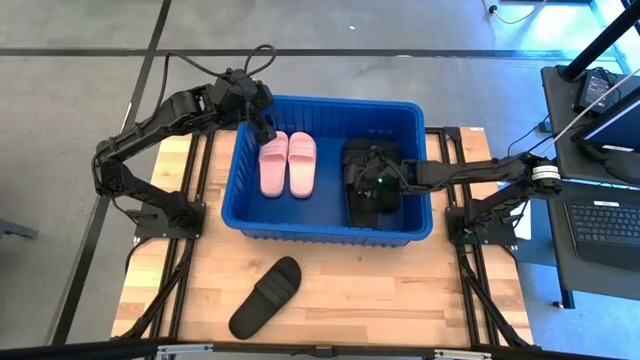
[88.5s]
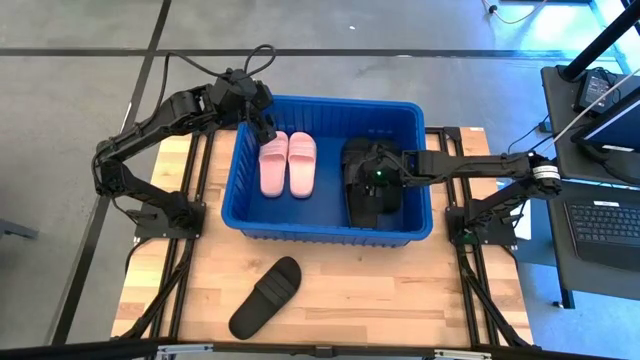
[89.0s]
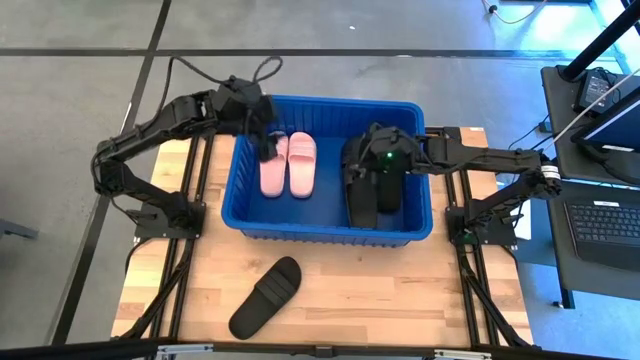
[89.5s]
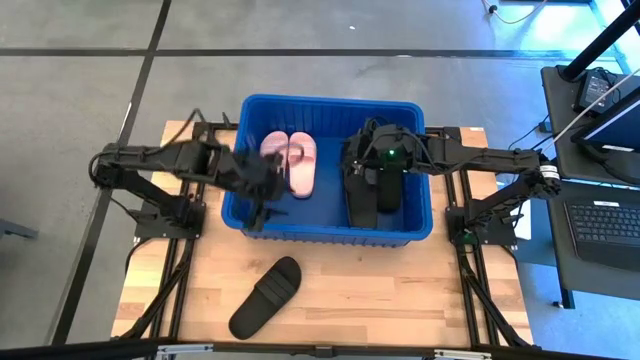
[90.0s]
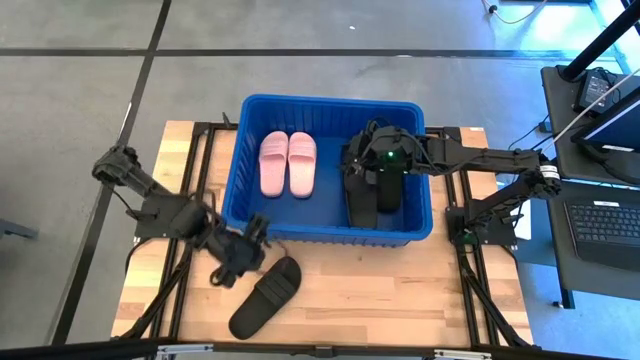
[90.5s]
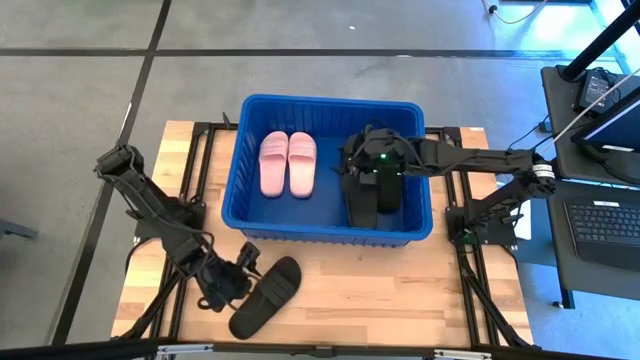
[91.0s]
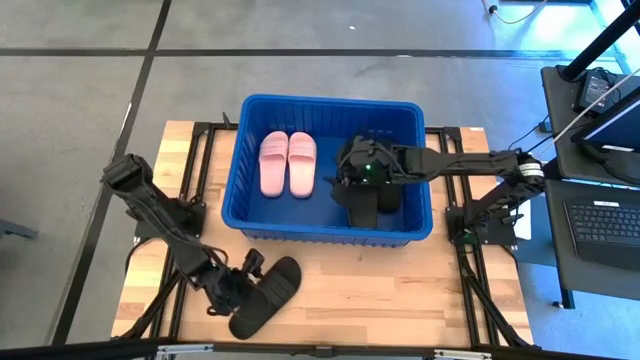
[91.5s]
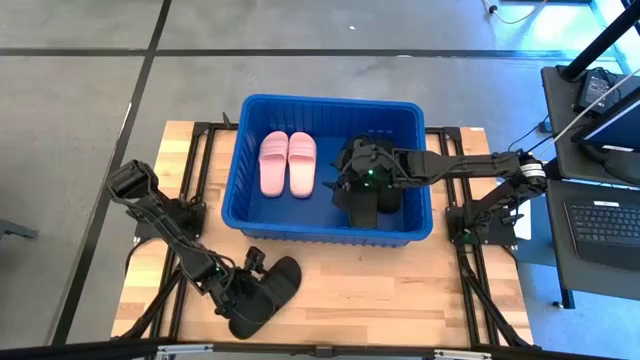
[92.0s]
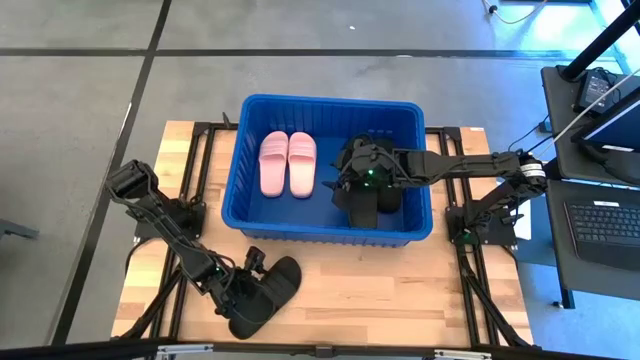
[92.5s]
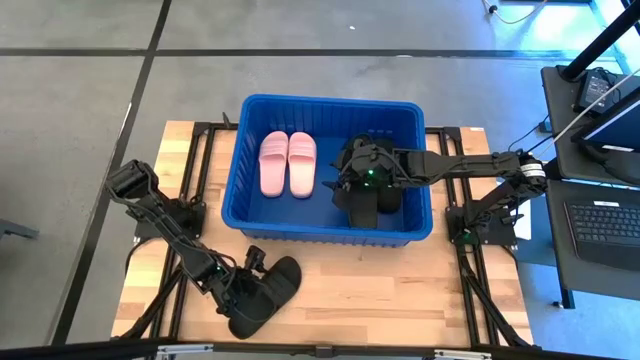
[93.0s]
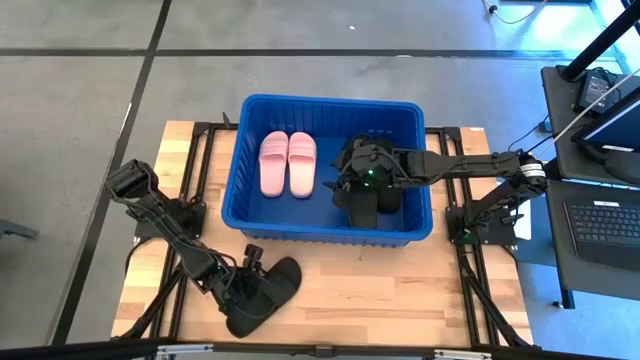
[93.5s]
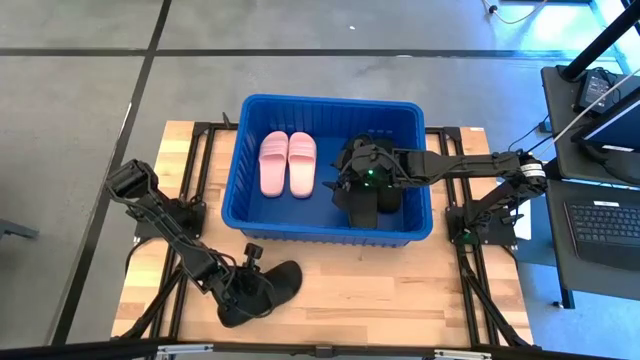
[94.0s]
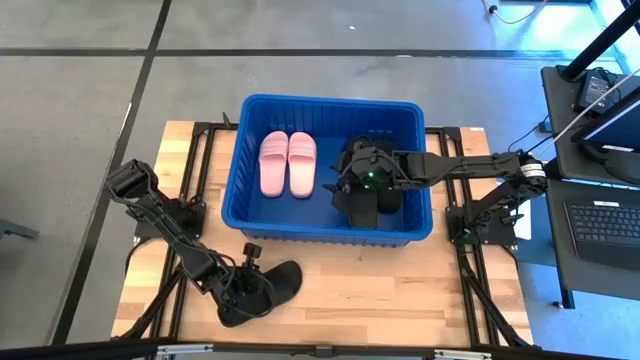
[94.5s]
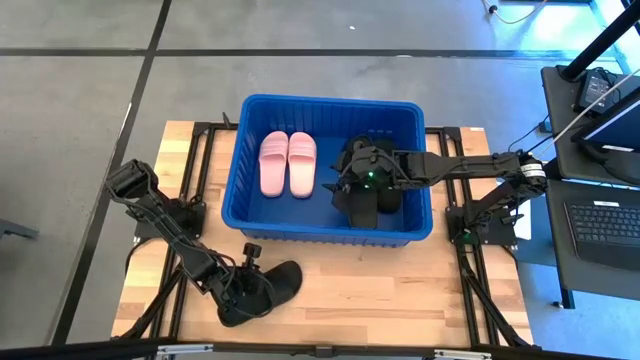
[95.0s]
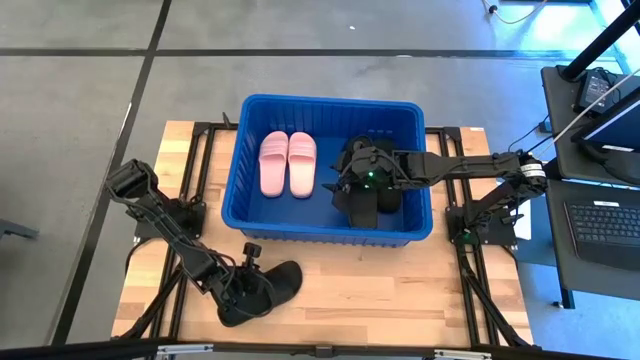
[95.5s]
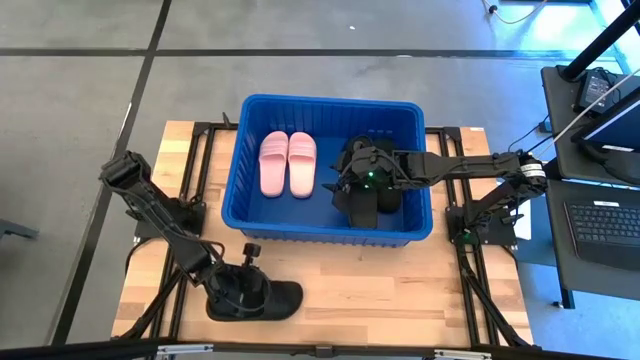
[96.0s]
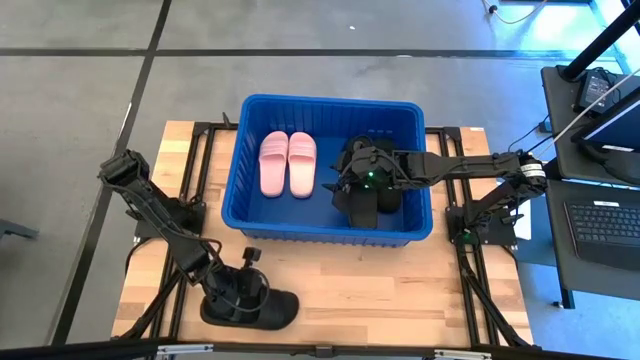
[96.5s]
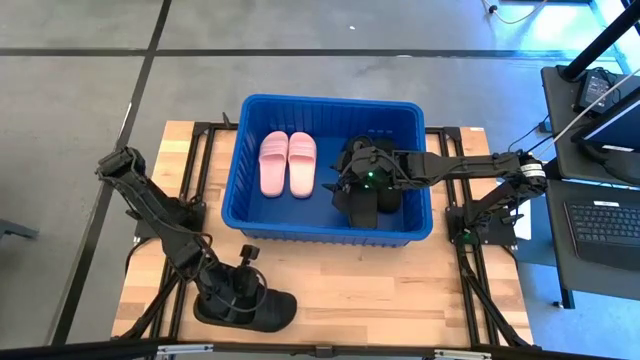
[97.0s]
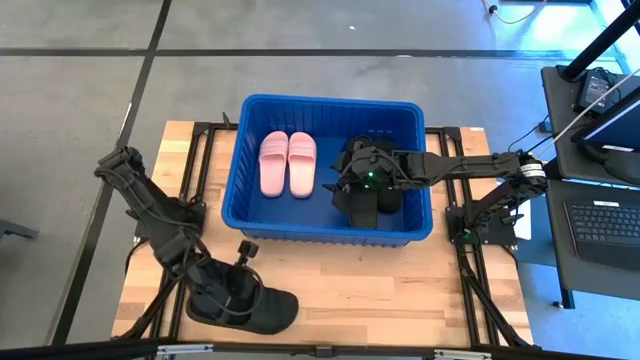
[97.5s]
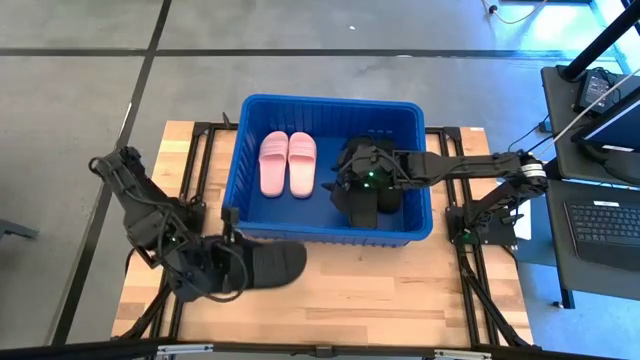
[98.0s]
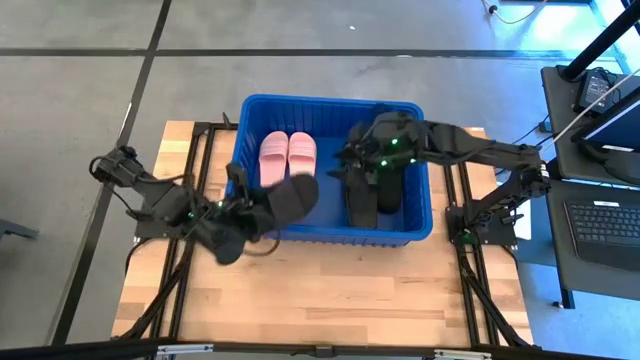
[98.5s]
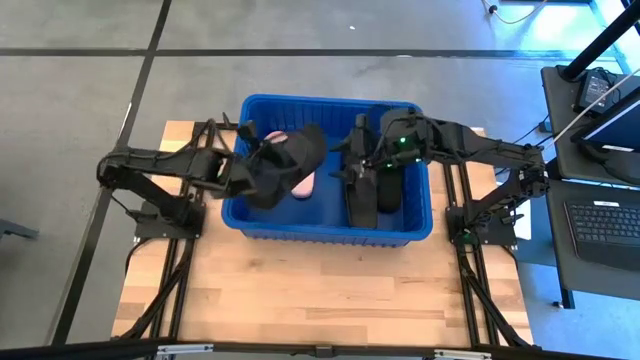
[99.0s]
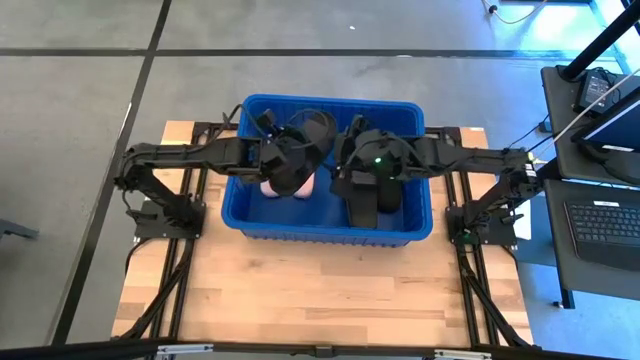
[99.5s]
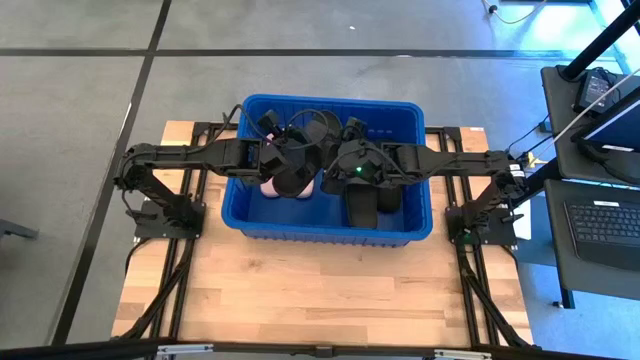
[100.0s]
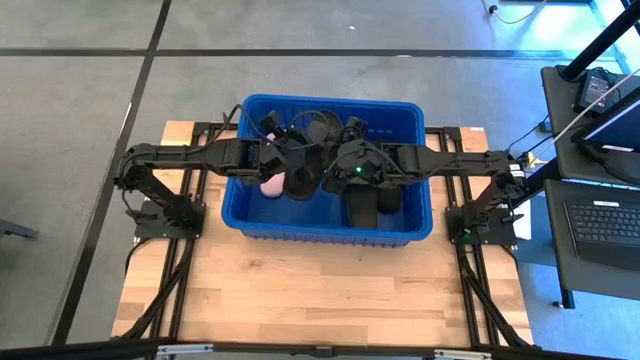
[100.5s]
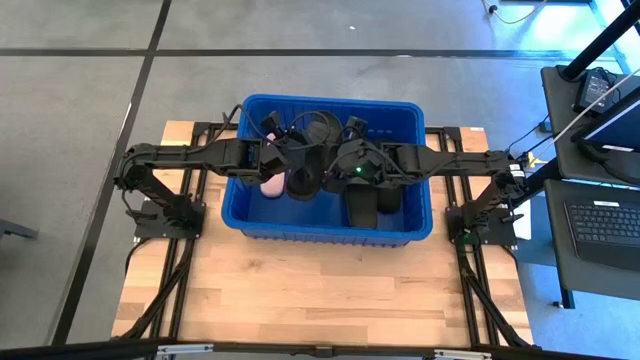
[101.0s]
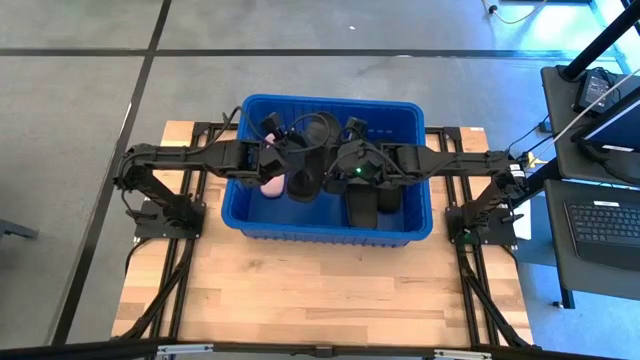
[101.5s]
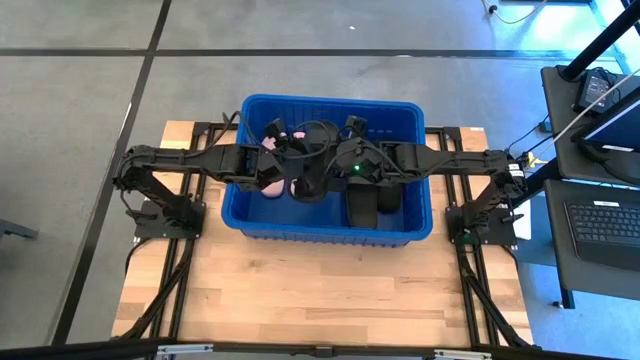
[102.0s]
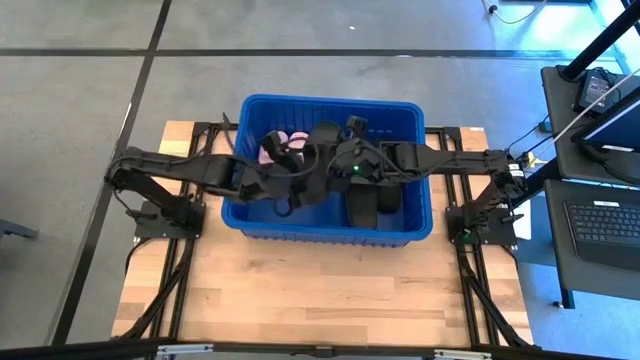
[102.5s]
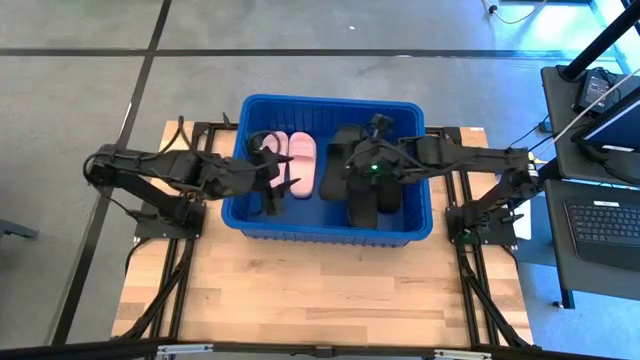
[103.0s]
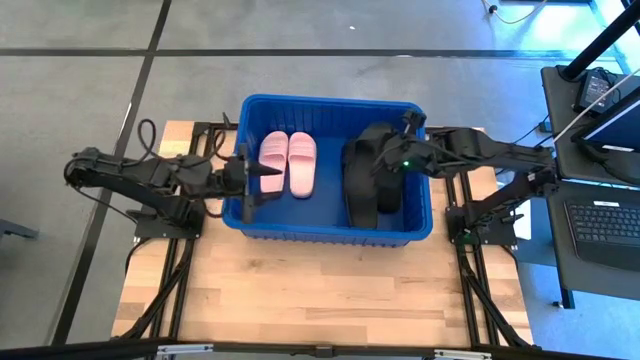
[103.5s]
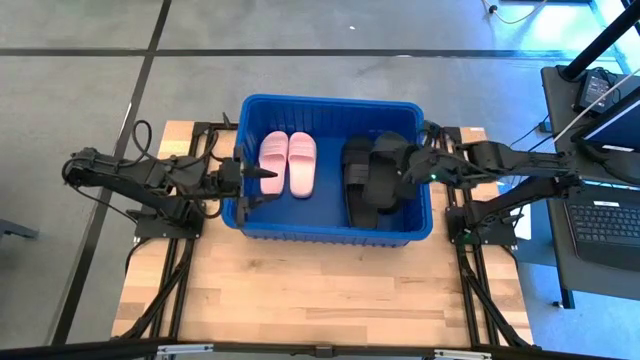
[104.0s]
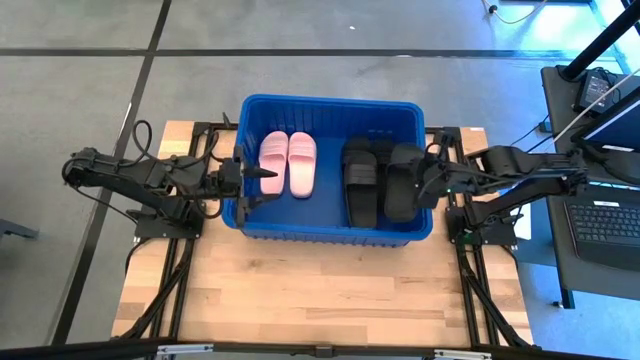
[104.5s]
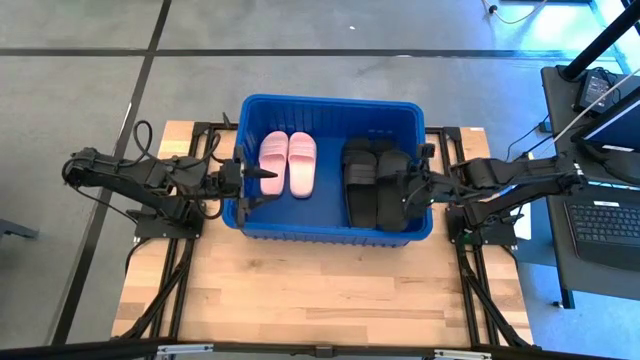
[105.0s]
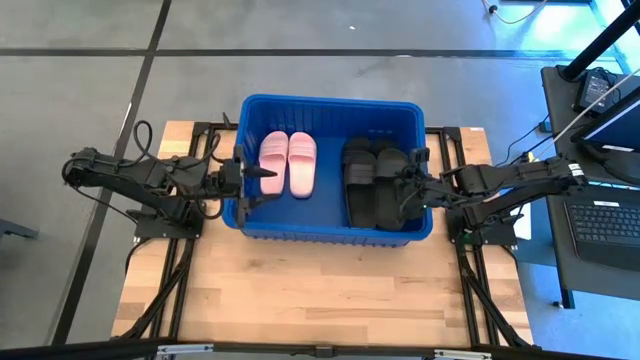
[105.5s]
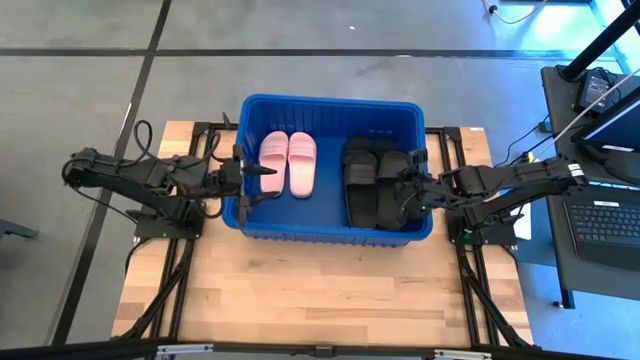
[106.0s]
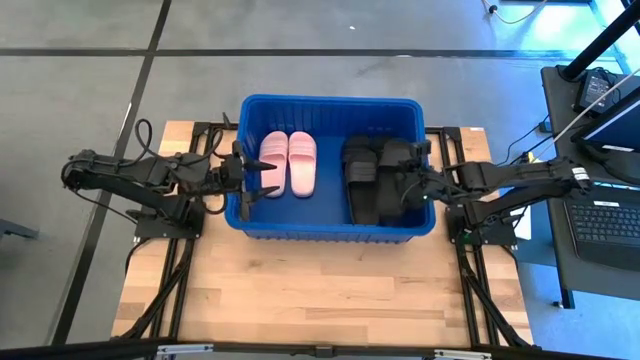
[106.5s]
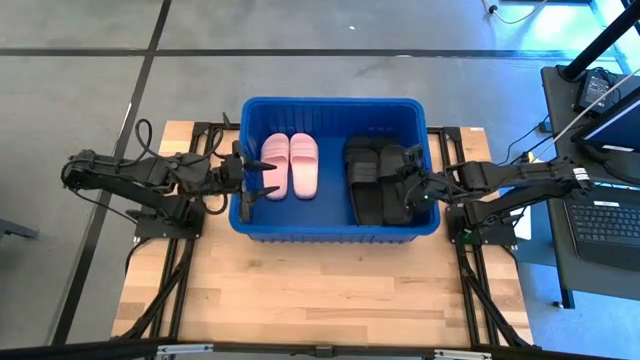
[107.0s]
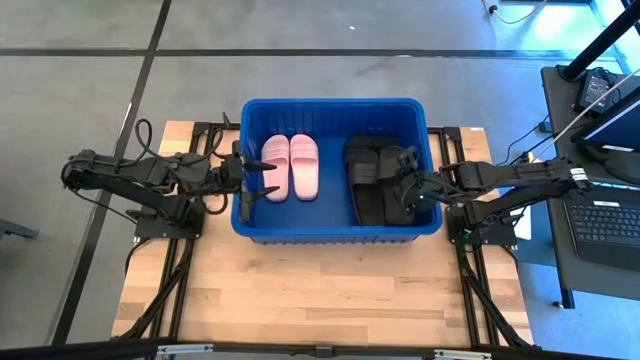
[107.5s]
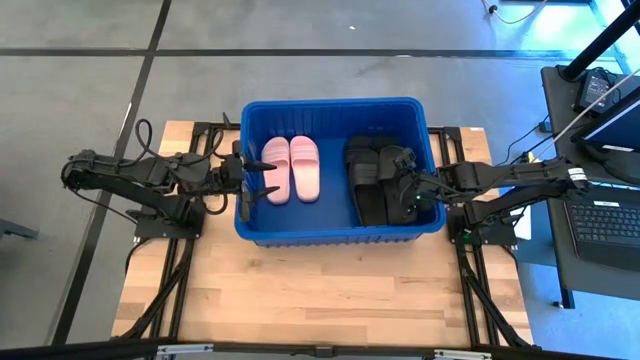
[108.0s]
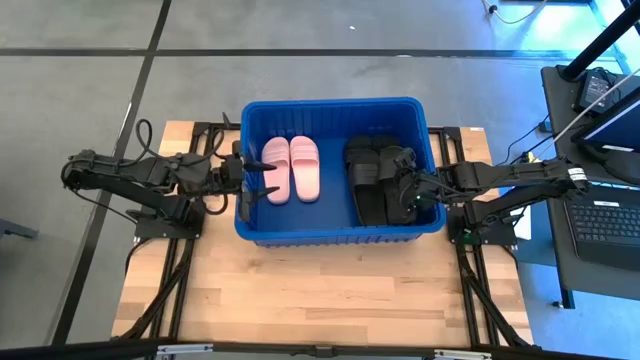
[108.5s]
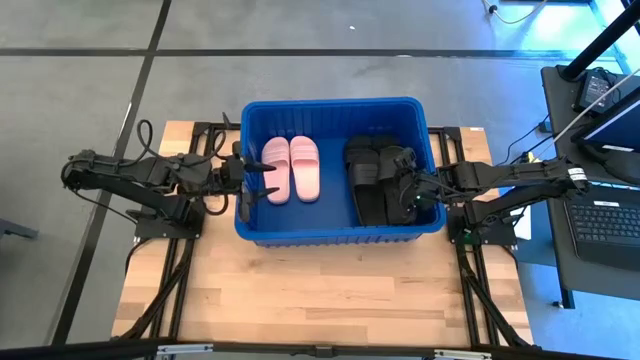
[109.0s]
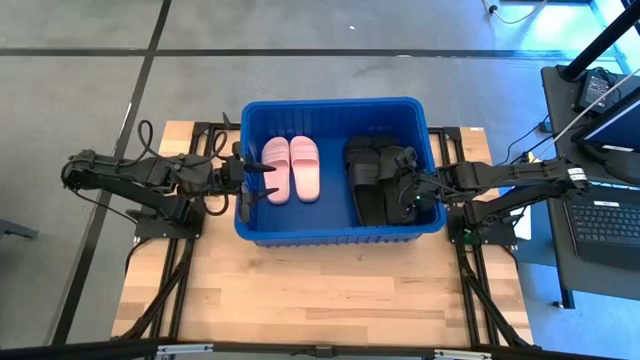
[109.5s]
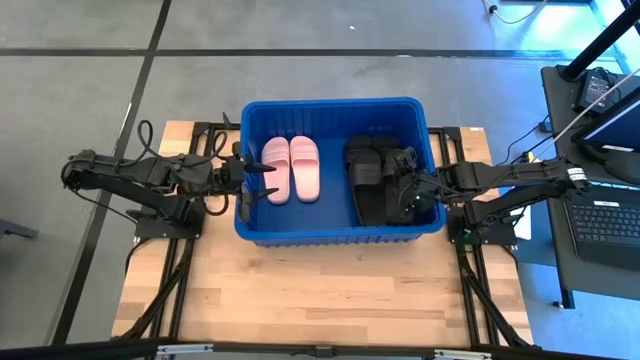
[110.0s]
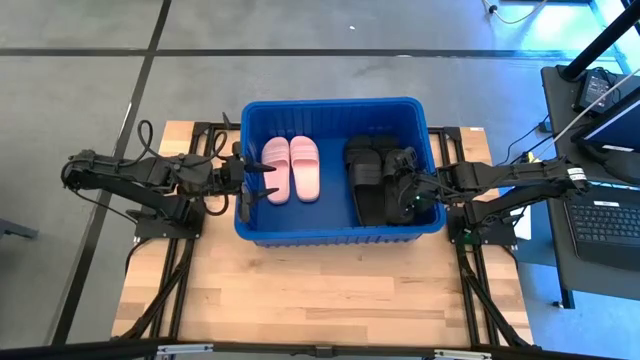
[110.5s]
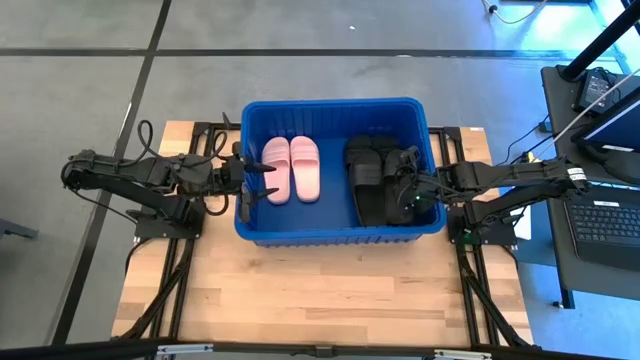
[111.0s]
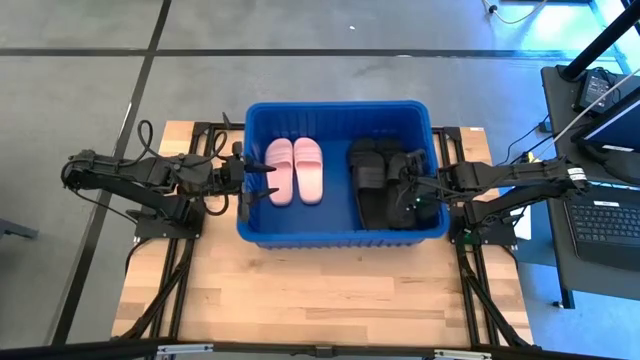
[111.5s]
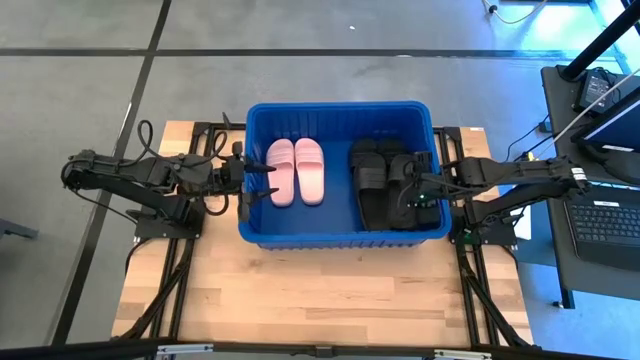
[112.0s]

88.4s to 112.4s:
Task: Pick and place slides into bin
Put the black slipper into the blue bin
